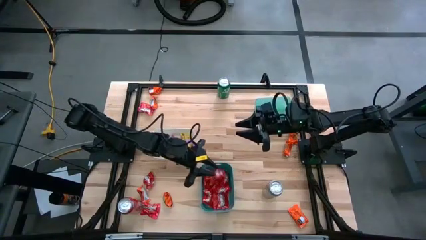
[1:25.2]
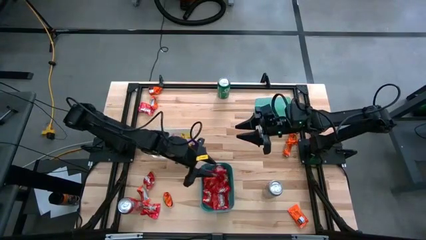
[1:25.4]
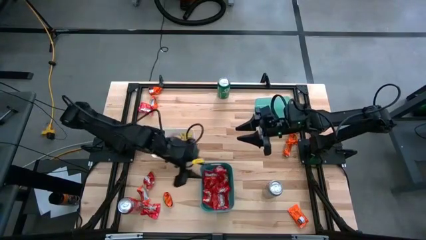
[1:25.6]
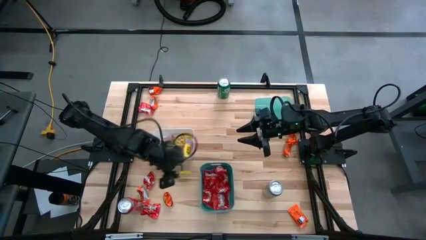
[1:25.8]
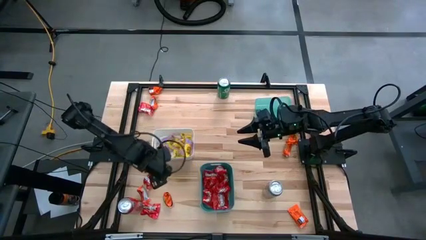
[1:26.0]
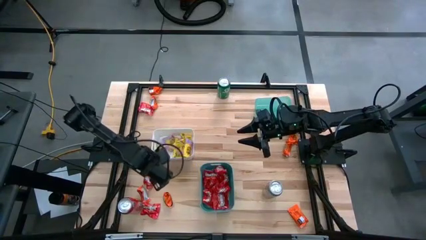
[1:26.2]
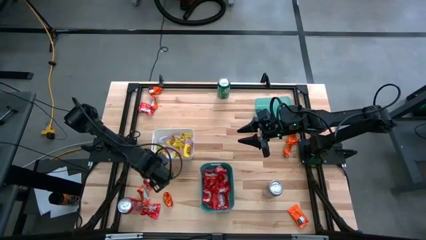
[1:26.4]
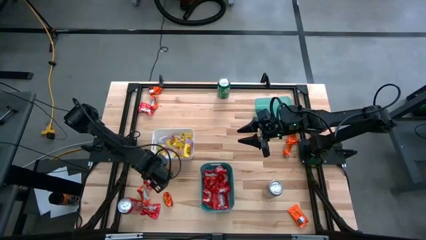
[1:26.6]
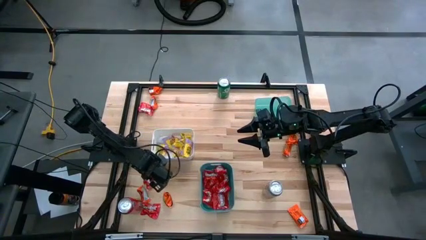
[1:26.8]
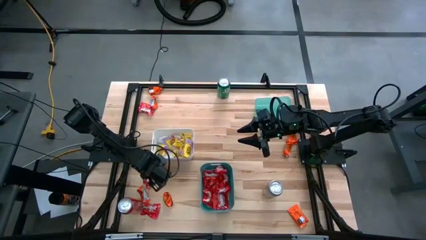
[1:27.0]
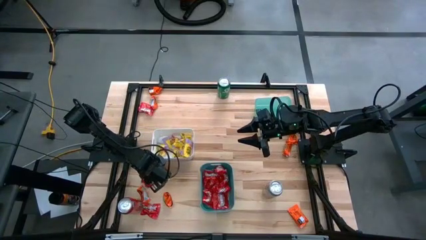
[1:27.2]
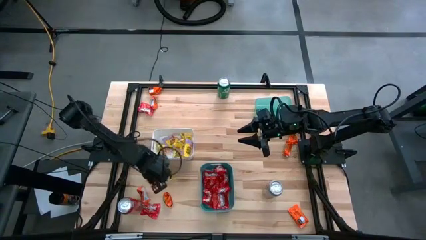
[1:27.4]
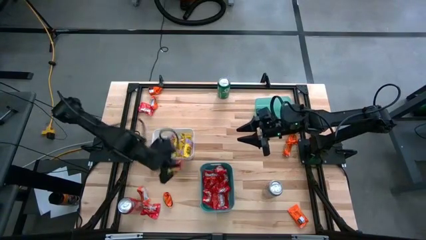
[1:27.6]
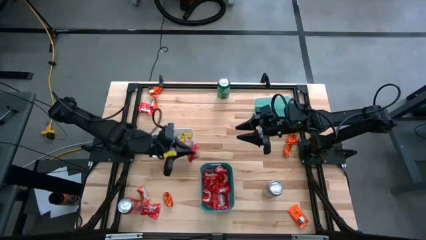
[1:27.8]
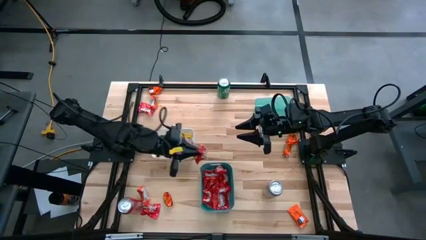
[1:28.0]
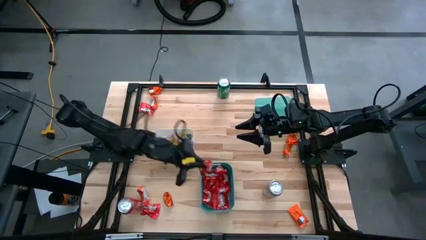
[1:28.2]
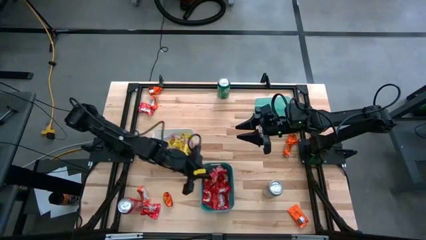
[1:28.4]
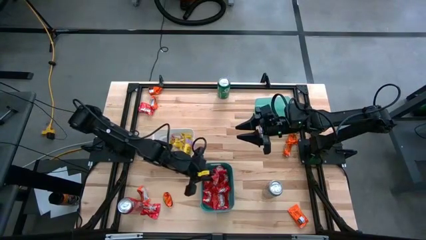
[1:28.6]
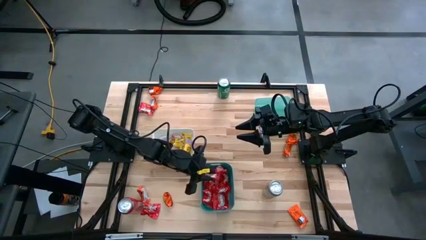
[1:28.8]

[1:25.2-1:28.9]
Task: Sort candy
Put the red candy pack into the green bin

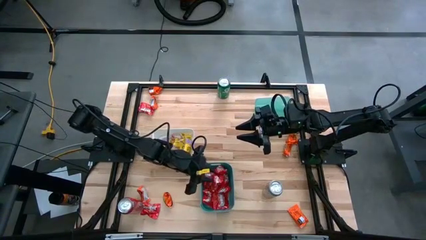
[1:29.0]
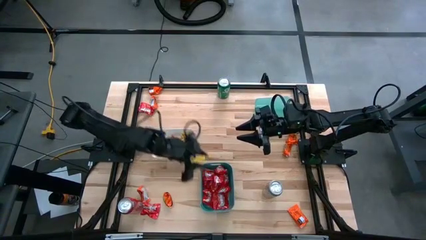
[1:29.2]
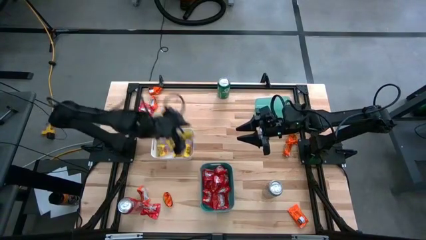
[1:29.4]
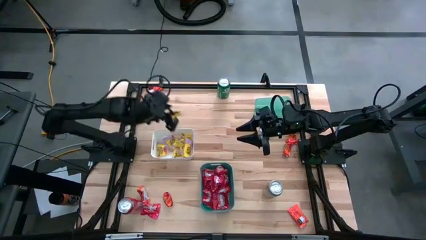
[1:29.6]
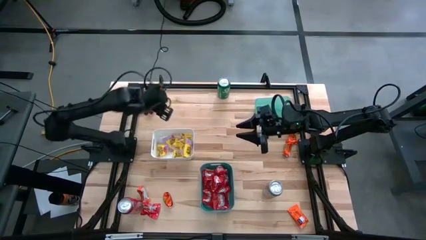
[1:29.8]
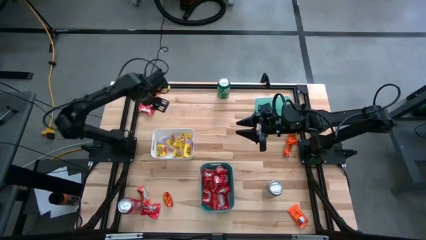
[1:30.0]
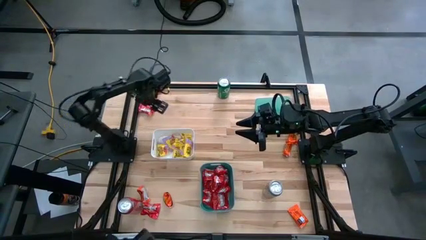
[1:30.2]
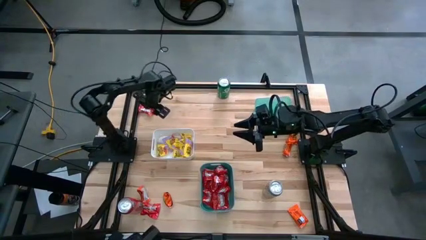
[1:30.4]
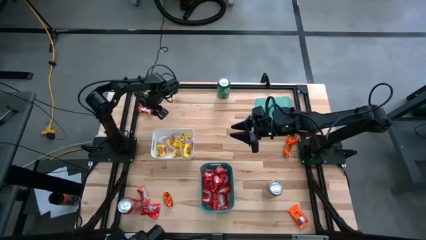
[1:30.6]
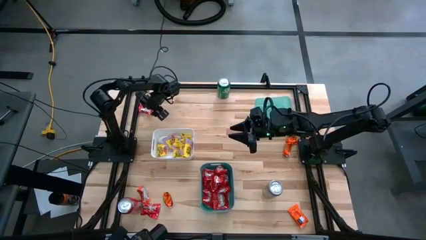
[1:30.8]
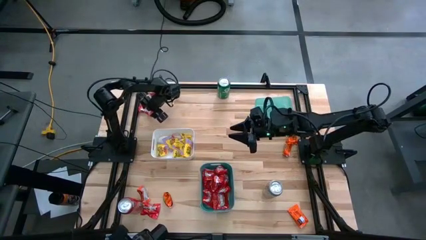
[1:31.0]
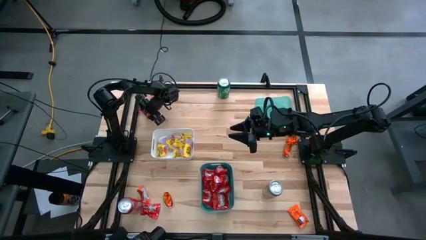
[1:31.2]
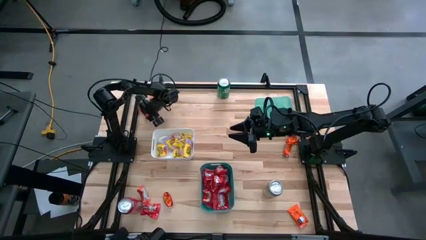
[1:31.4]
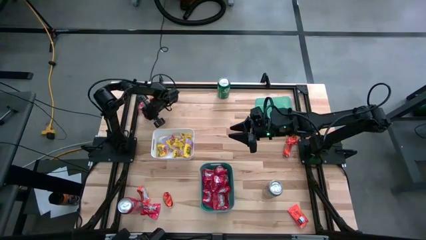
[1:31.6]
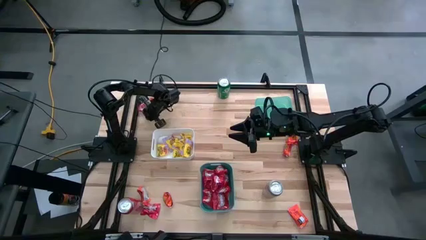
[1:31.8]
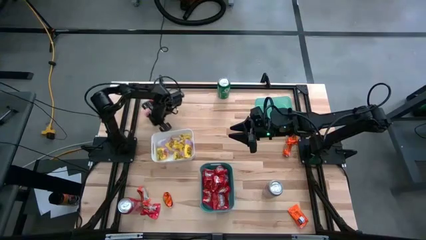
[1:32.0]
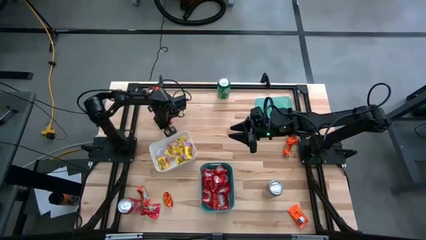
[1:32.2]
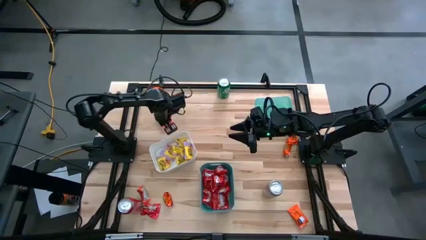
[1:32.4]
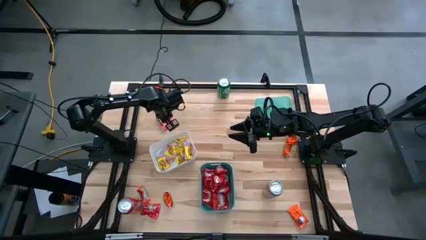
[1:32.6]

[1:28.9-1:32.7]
Put the red candy pack into the green bin

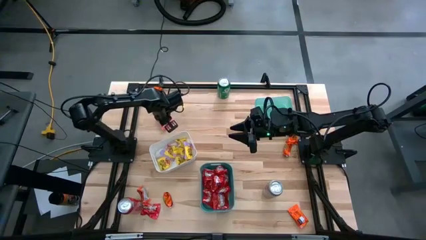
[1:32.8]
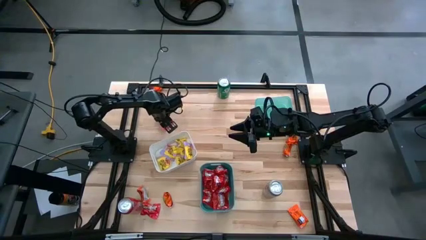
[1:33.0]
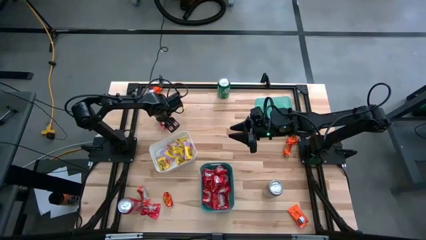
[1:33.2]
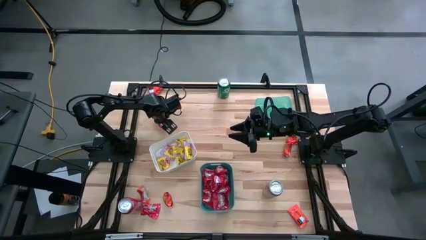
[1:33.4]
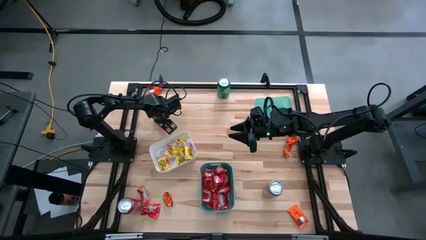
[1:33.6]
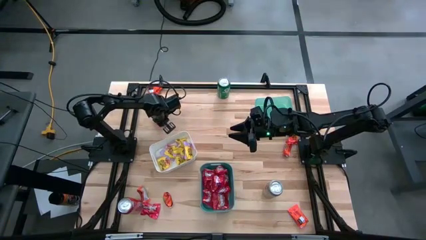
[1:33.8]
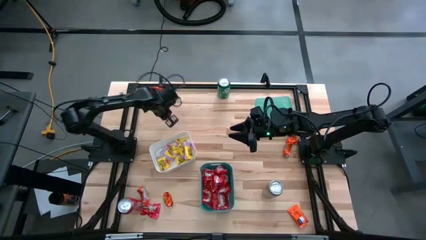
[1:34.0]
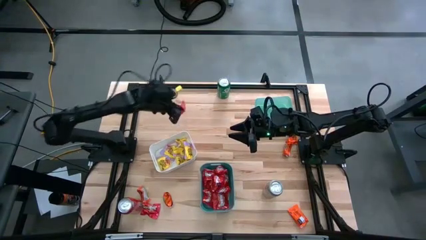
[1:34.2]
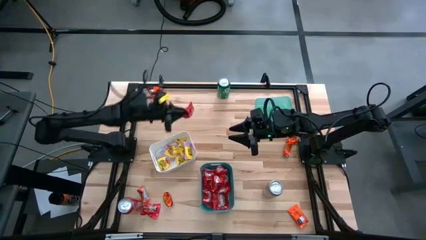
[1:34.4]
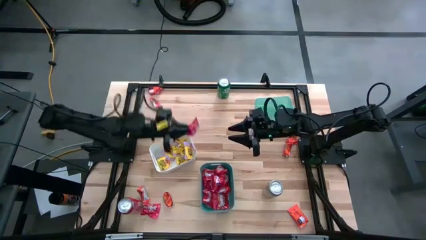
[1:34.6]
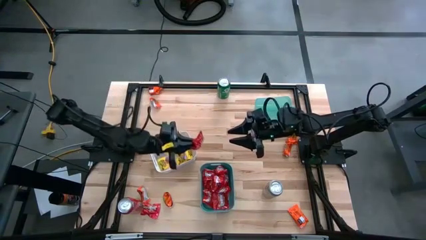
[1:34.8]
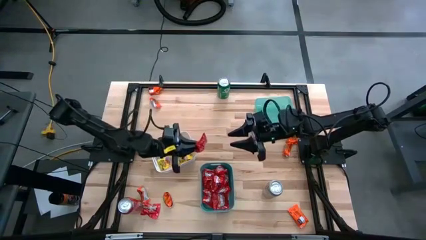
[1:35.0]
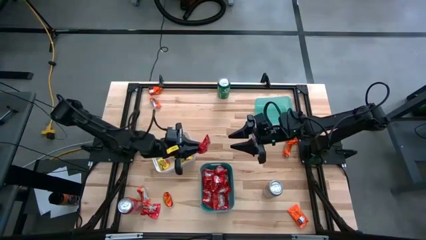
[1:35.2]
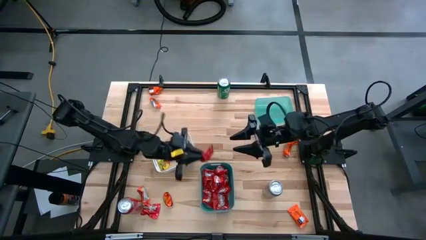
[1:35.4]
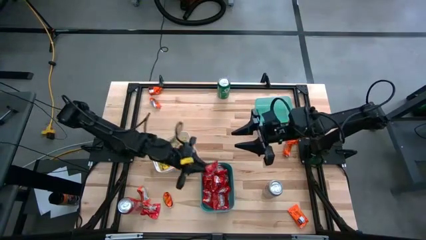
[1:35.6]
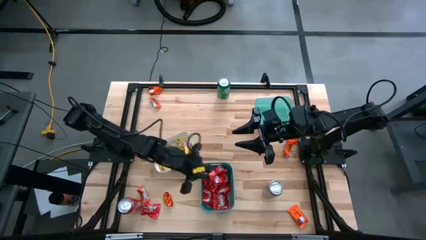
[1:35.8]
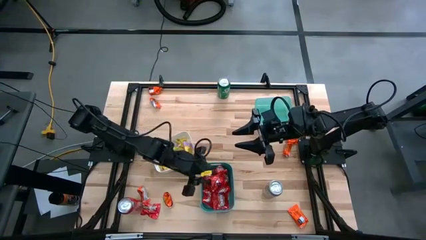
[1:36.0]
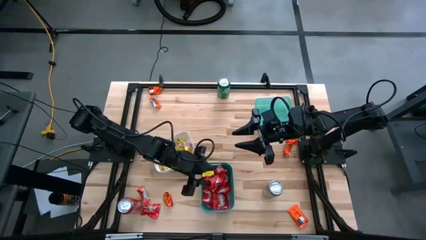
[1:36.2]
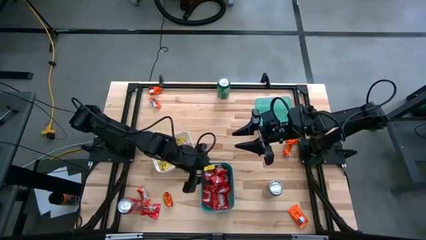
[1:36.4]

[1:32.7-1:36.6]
Put the red candy pack into the green bin

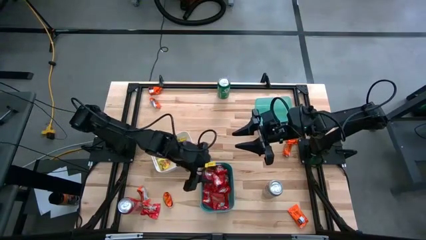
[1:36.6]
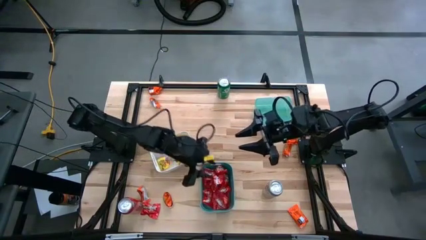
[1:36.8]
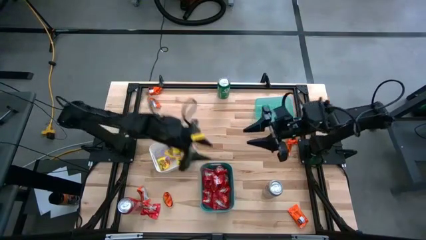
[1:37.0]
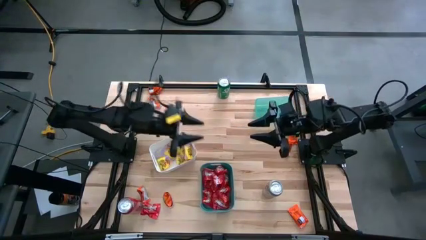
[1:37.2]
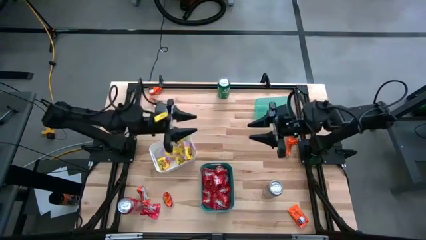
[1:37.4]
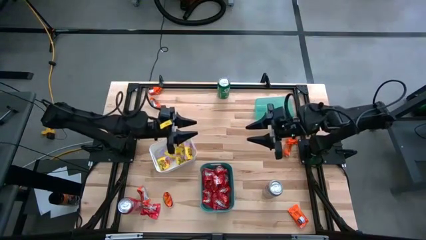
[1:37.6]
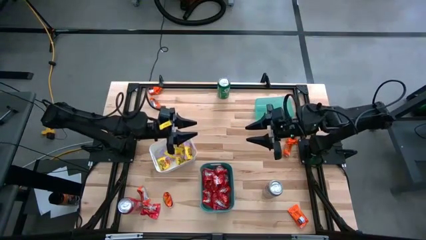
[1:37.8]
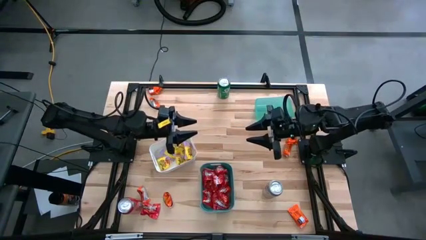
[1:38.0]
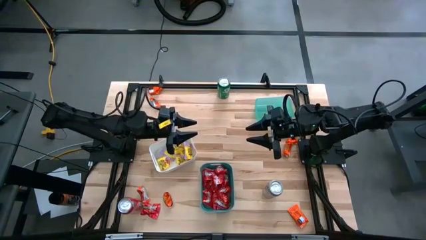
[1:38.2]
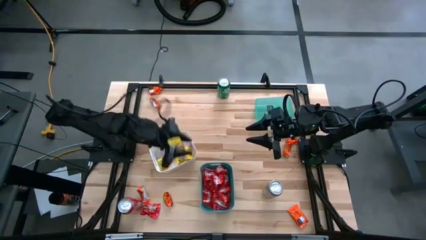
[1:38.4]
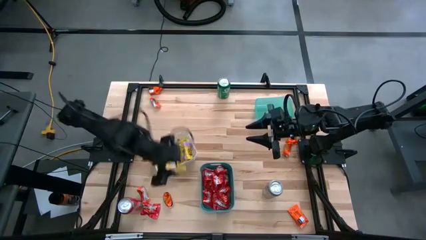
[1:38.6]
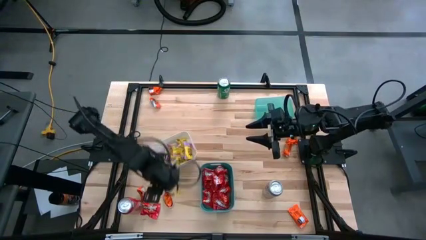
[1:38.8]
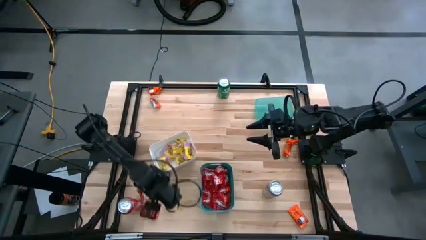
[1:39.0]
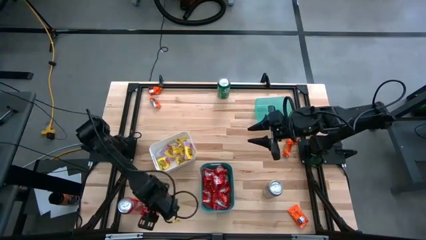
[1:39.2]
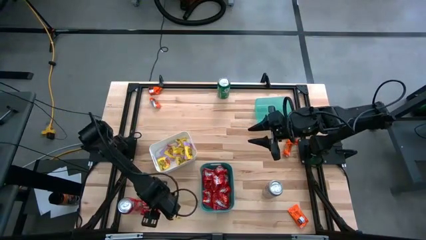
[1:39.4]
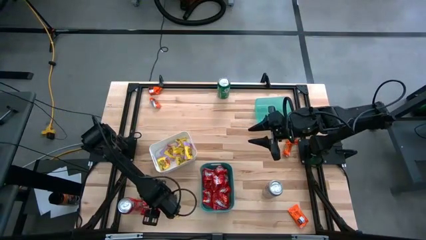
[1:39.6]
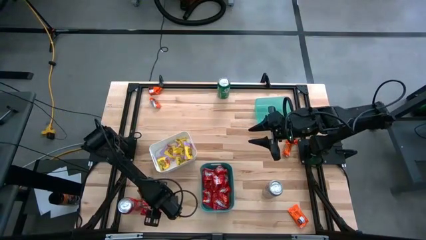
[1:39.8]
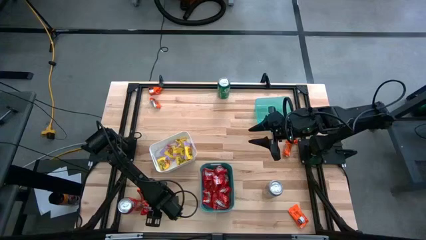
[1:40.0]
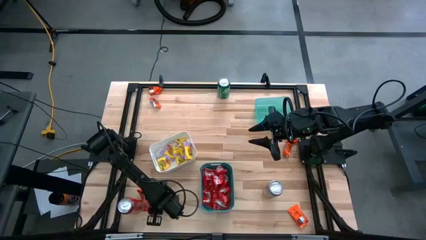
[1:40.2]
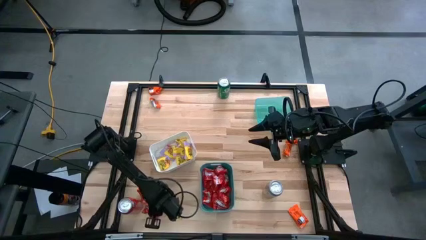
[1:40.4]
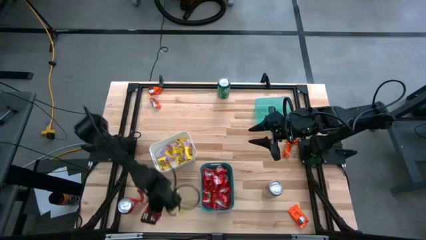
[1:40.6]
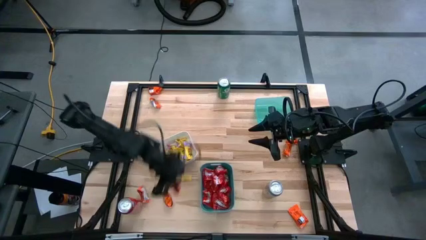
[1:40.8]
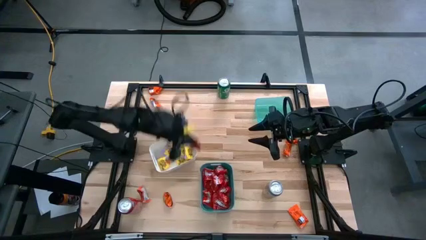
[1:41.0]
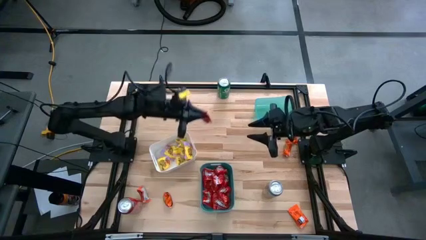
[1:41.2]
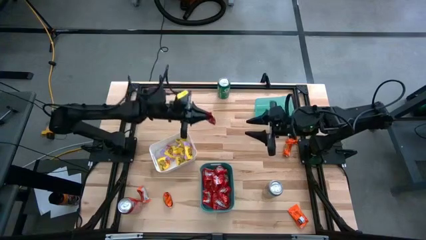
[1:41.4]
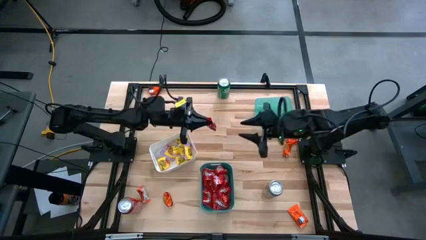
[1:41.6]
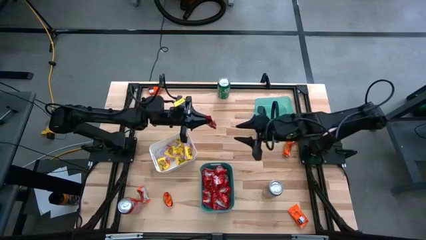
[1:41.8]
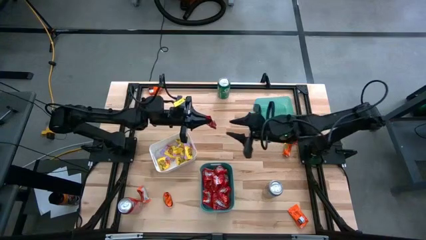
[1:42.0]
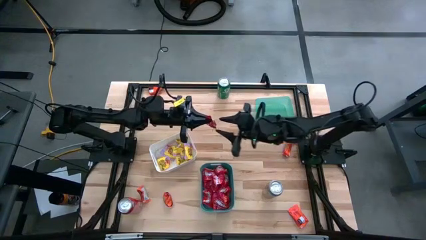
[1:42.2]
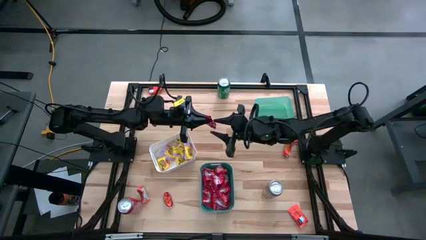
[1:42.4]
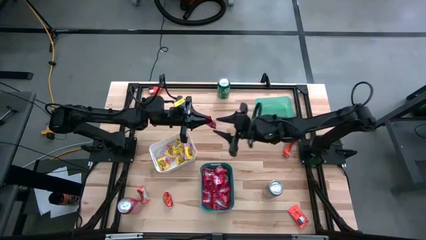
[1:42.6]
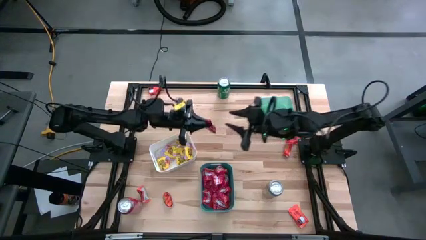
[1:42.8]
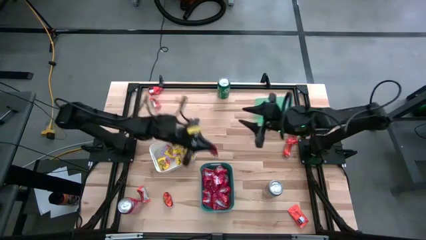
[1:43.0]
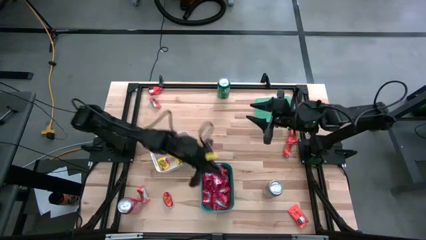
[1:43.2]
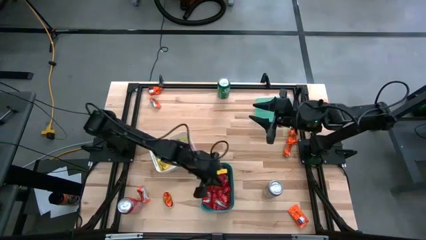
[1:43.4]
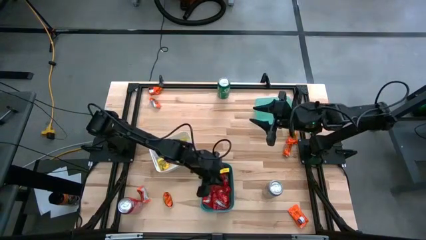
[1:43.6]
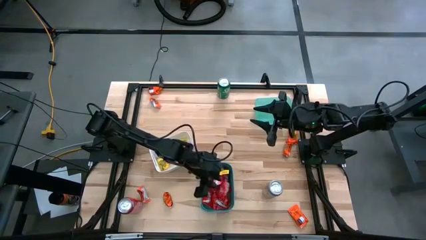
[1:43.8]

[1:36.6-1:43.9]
Put the red candy pack into the green bin
